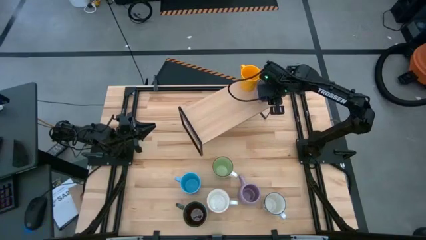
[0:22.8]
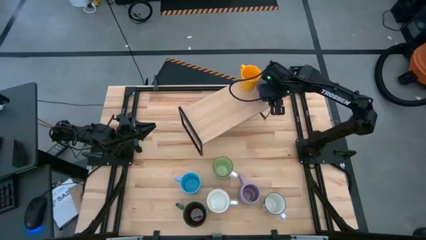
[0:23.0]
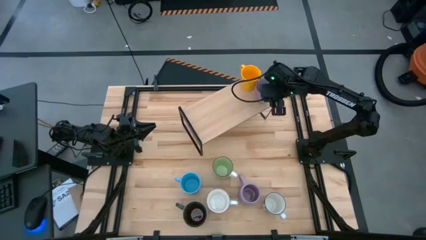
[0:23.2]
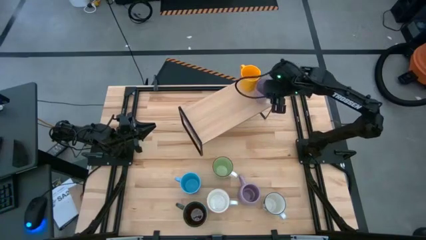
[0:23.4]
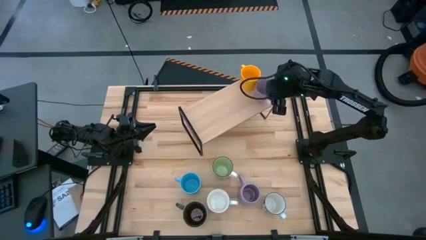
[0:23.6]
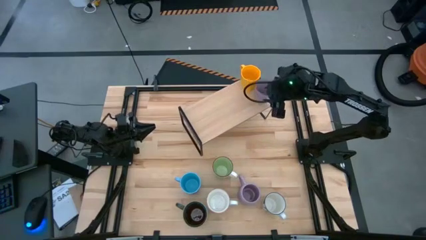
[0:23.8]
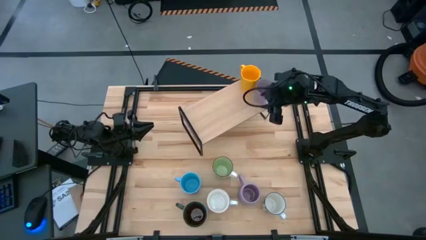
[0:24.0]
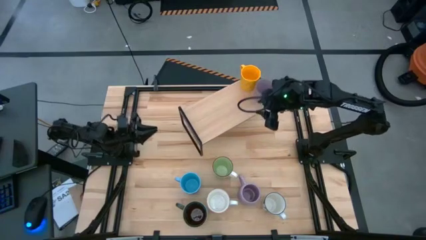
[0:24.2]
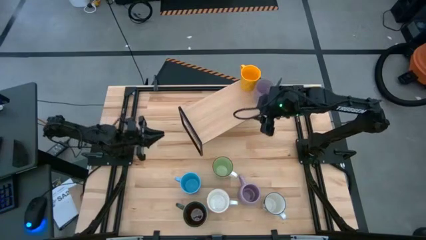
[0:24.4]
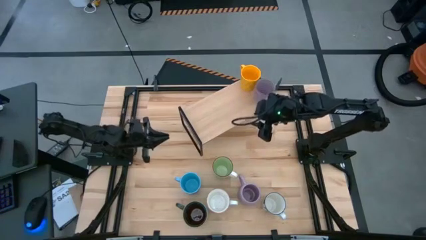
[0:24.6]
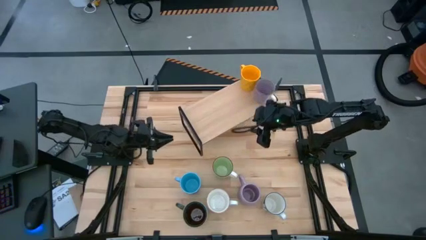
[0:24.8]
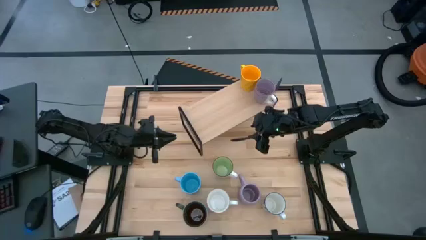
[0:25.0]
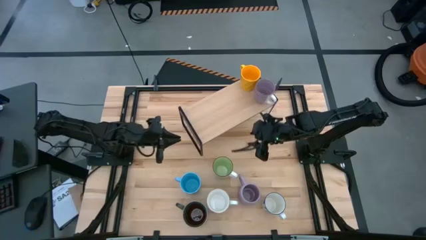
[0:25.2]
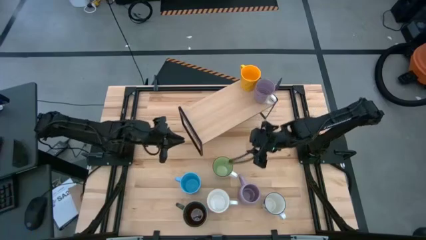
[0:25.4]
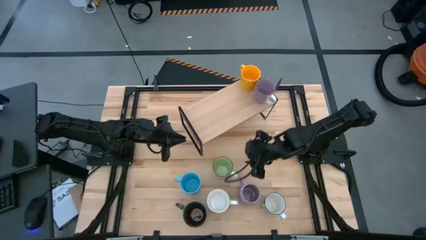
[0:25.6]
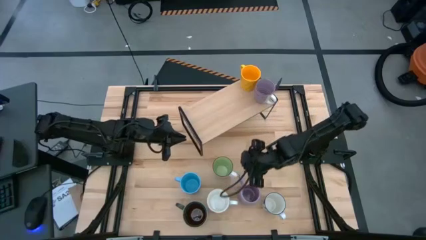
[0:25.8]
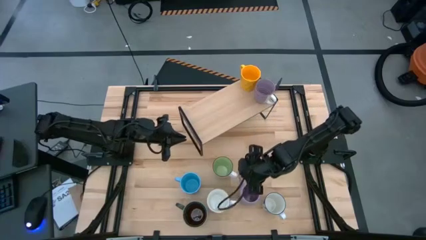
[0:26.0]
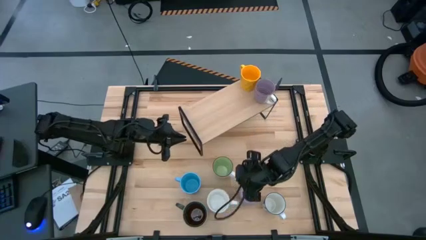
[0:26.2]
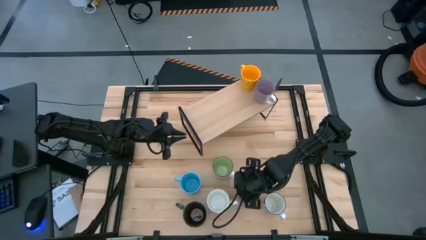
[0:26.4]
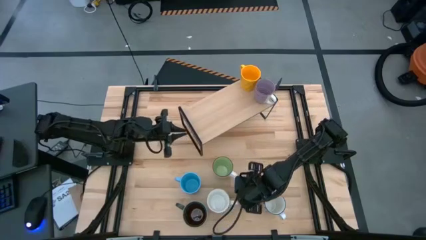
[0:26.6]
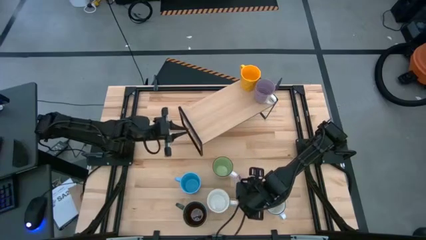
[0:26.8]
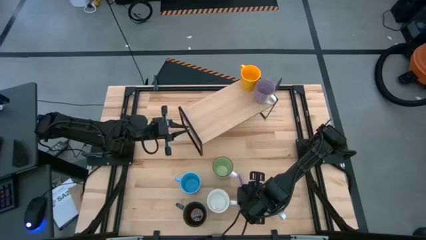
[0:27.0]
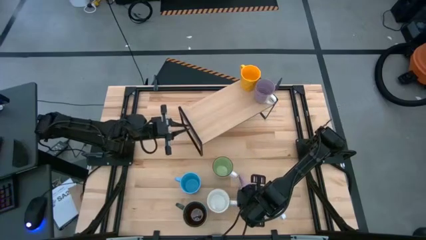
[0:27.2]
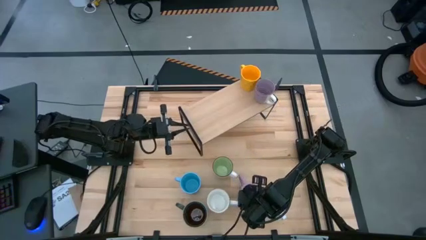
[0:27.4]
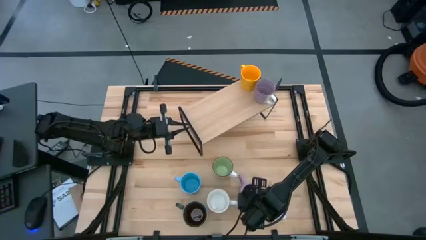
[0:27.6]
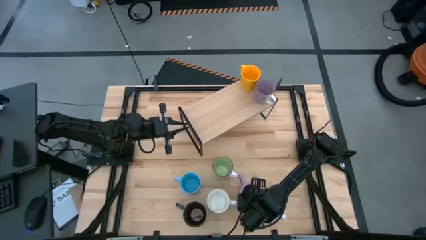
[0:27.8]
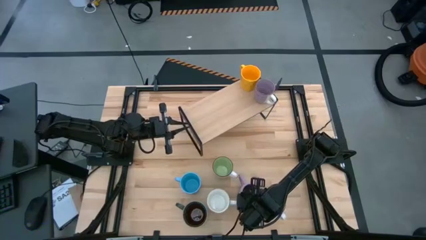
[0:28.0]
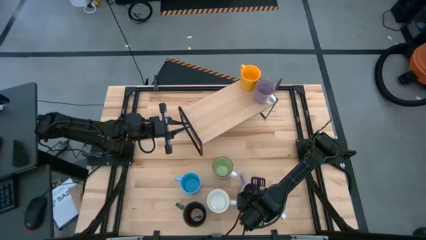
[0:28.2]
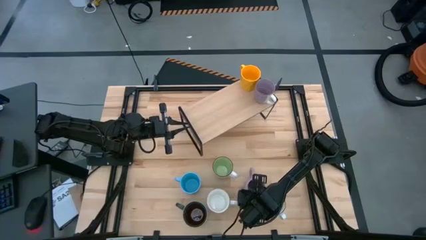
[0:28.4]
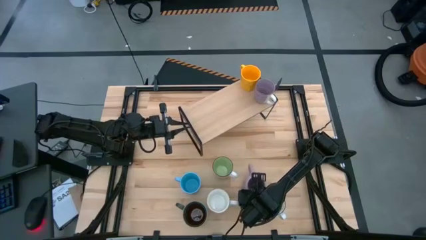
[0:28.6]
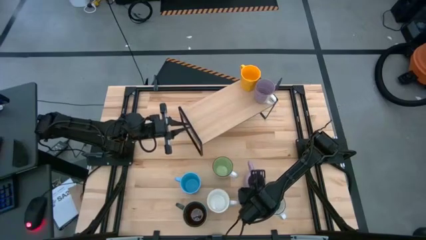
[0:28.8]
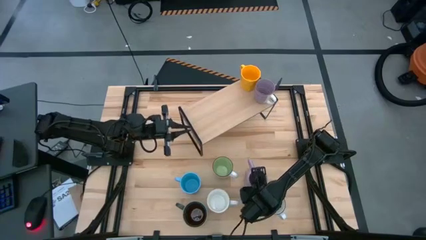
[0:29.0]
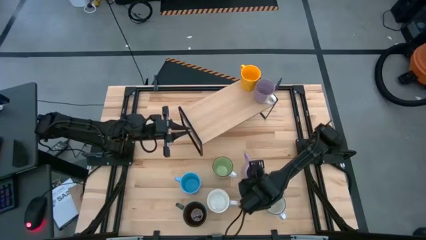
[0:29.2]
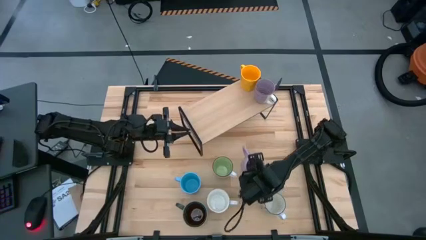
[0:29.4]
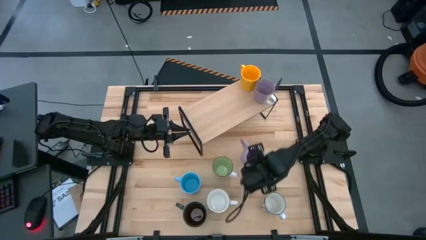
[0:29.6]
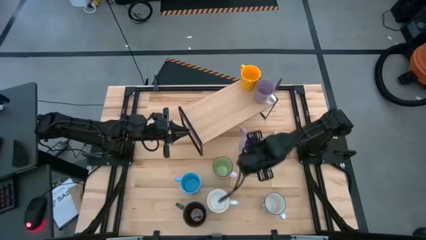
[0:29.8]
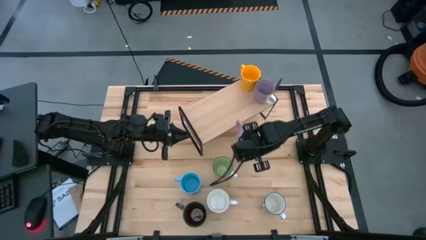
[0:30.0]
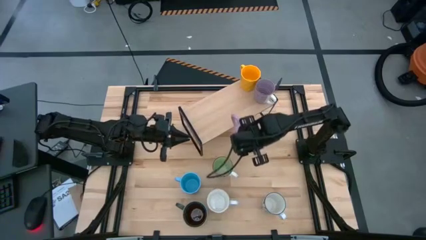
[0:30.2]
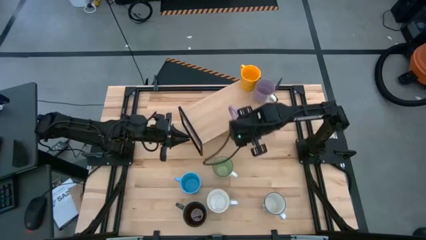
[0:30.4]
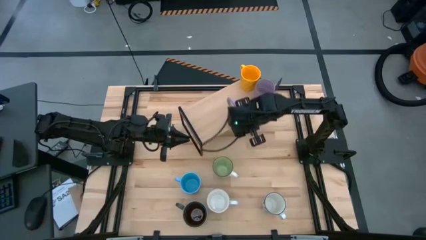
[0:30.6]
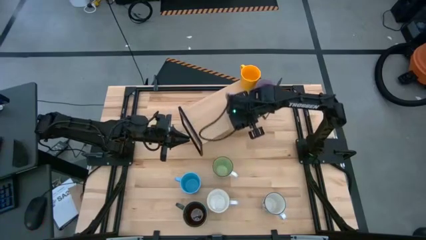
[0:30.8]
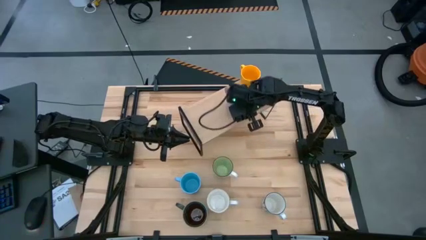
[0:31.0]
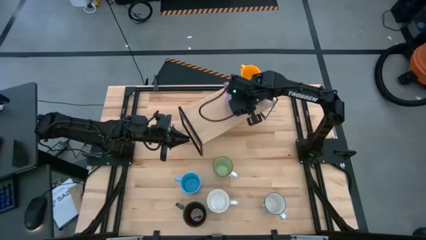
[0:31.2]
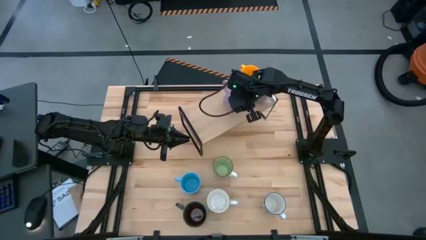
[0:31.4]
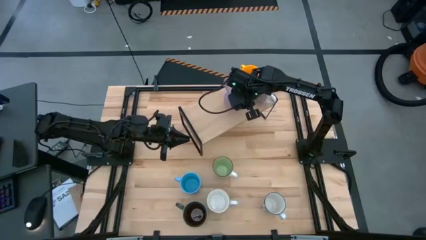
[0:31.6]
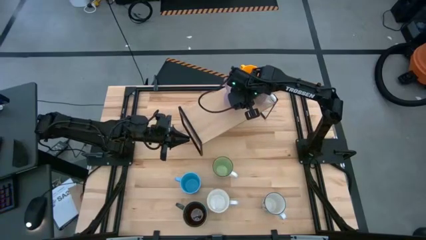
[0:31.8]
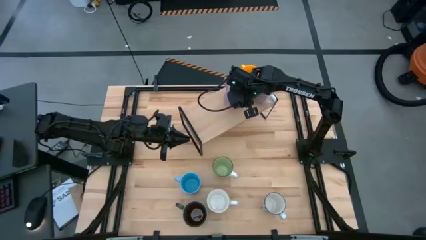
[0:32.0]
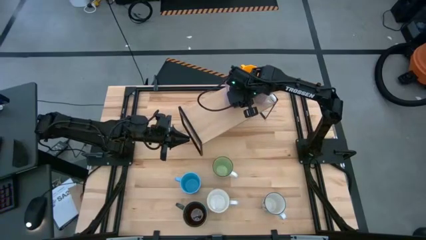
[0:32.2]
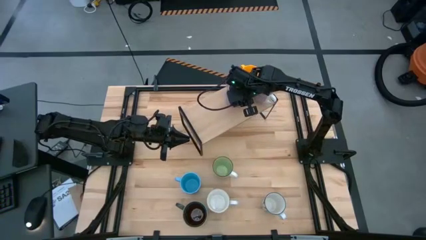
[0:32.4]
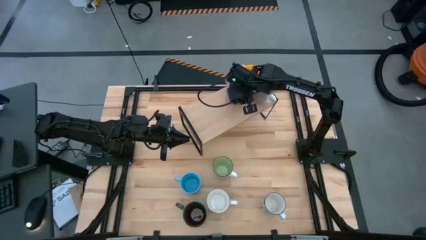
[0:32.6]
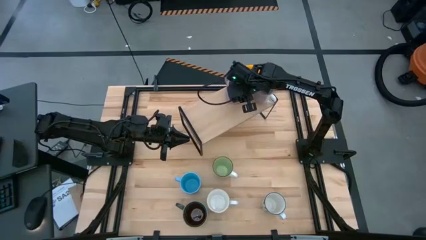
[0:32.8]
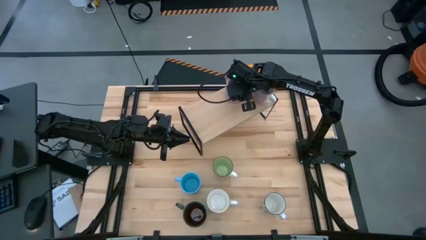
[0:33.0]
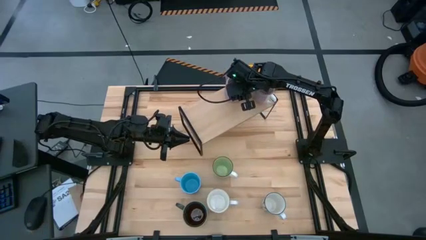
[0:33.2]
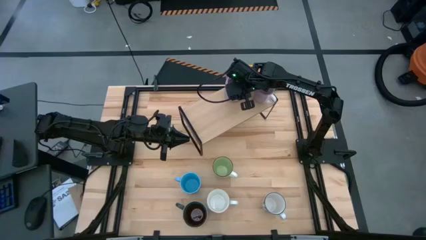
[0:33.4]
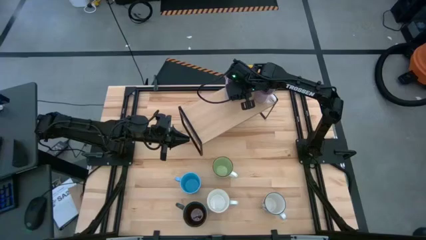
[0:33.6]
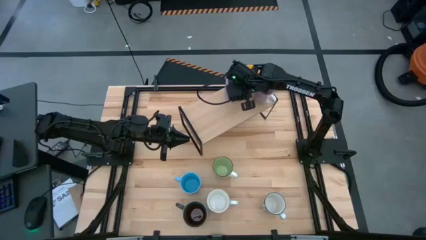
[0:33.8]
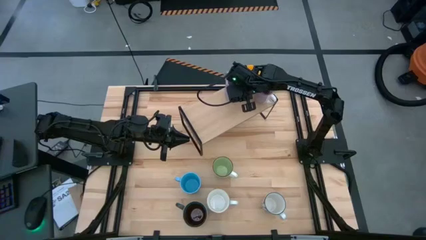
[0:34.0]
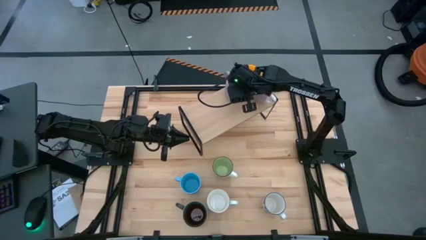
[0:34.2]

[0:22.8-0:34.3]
Task: Place coffee mugs
Put the purple mug on the shelf

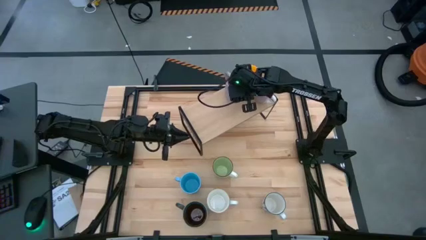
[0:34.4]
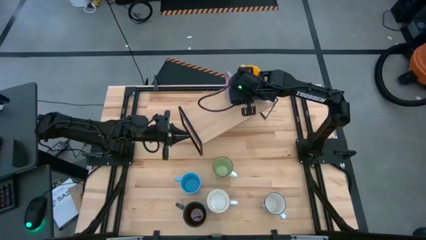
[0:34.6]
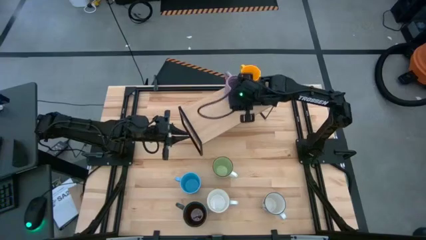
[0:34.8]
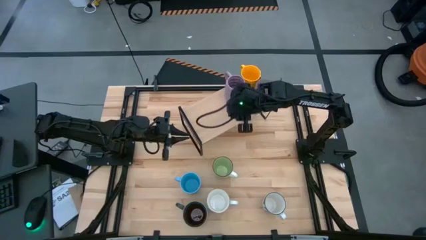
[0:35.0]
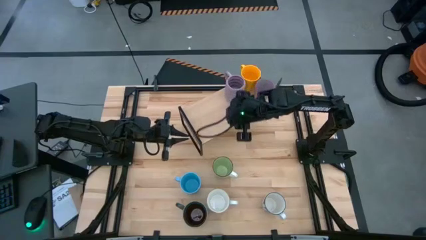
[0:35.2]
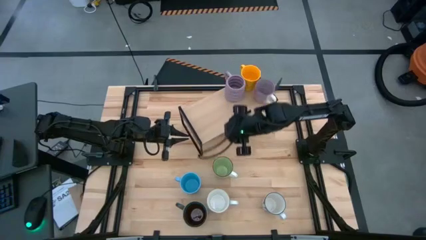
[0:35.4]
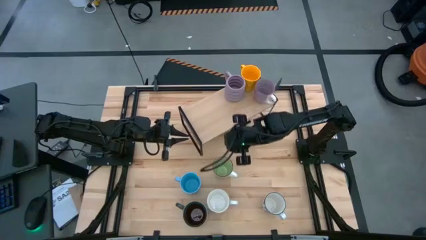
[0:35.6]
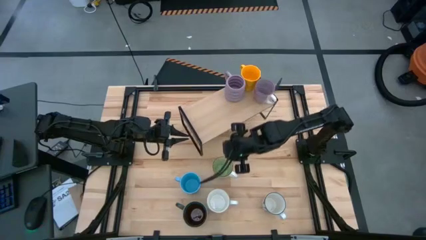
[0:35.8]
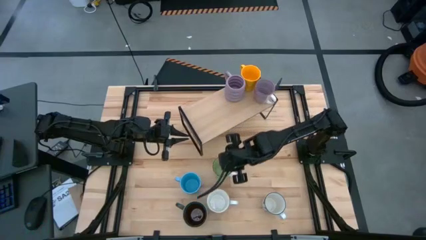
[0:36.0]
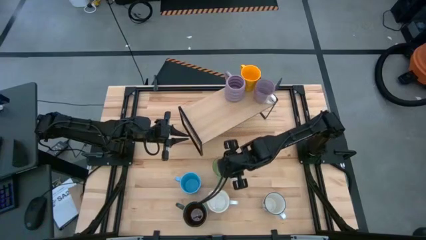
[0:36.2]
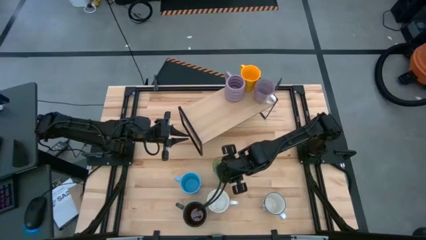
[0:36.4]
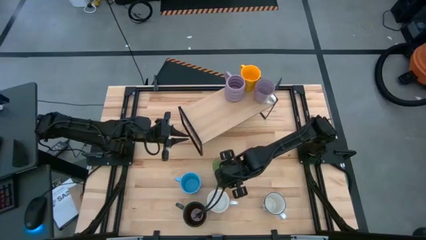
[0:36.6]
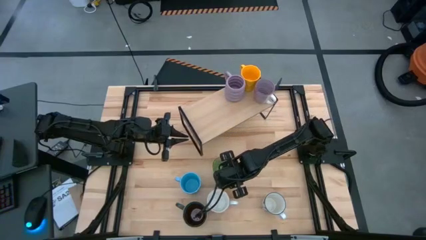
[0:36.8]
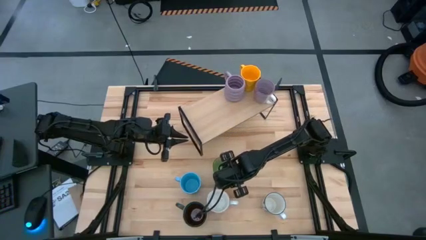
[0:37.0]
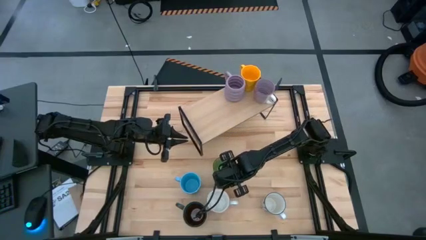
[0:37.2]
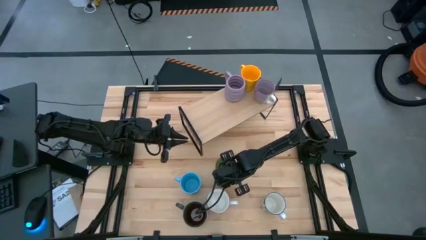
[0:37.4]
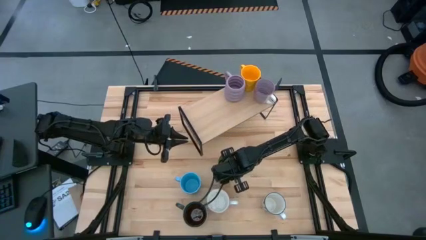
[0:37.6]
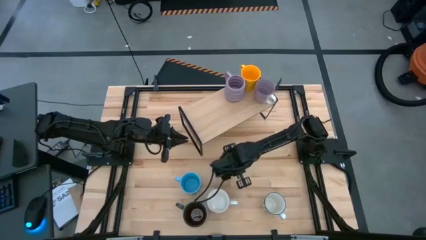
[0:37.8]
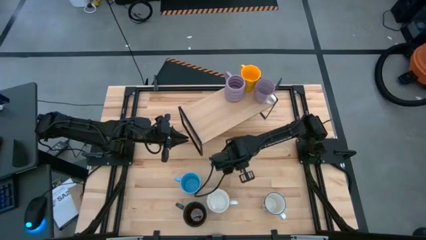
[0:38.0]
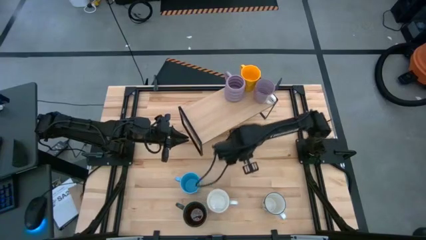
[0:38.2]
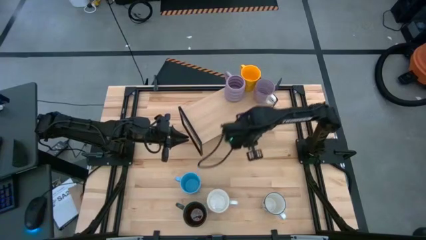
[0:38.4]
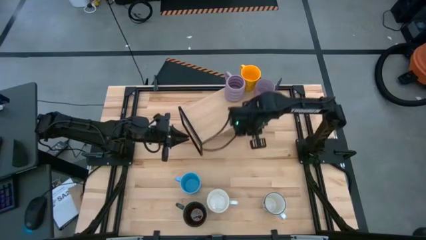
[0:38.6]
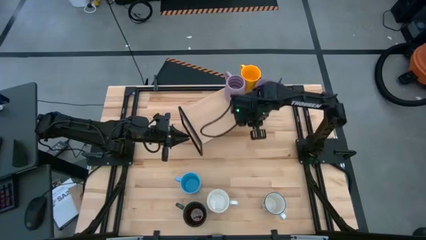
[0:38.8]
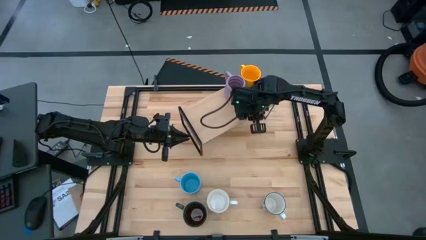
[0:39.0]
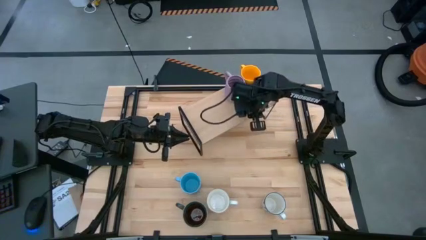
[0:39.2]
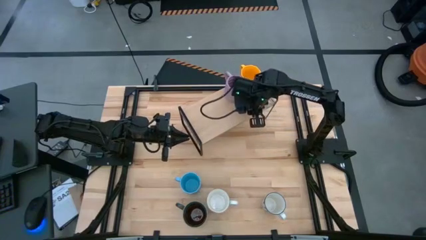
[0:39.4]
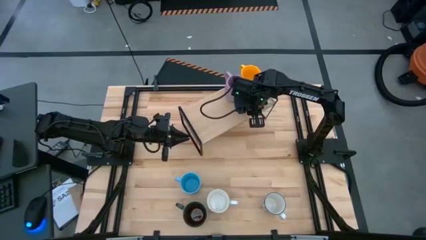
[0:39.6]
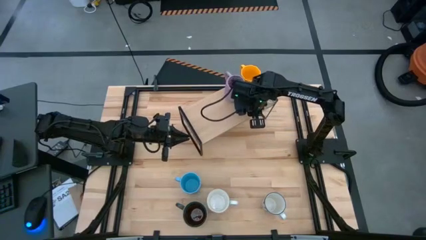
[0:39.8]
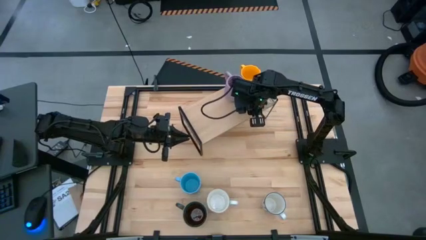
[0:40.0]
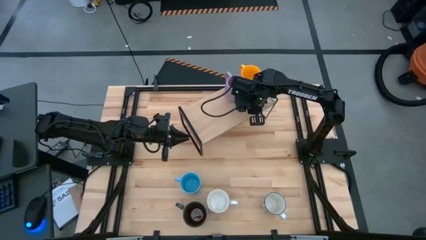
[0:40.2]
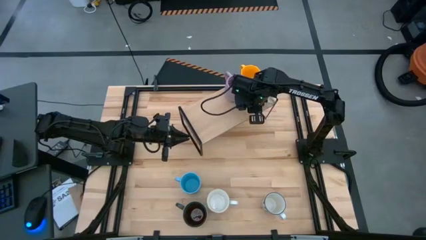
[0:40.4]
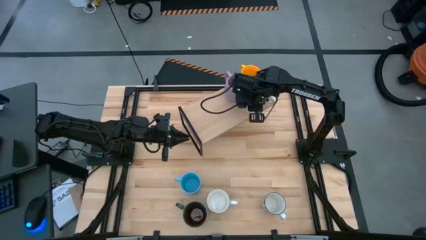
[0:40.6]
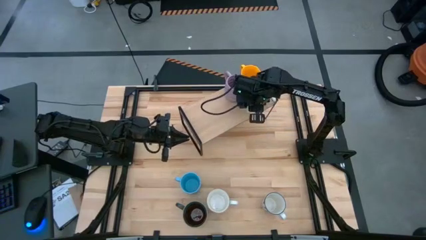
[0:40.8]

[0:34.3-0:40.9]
Put the light green mug on the shelf
